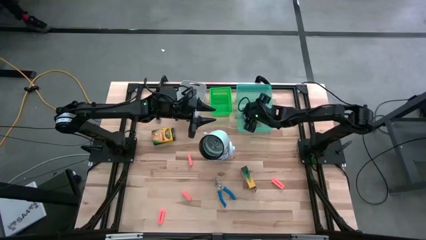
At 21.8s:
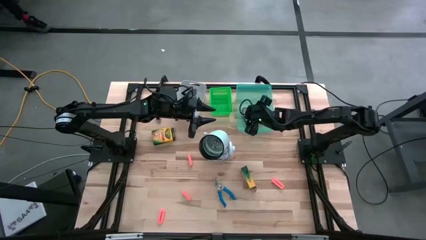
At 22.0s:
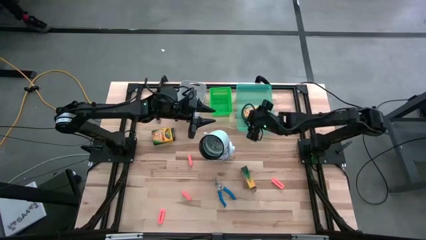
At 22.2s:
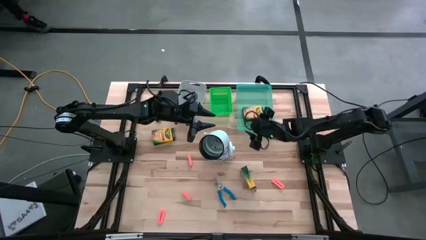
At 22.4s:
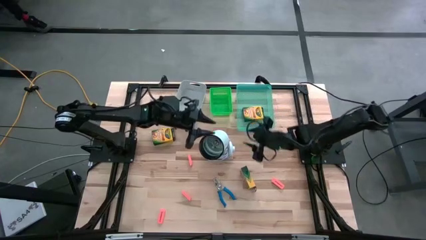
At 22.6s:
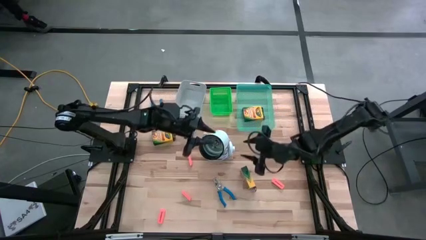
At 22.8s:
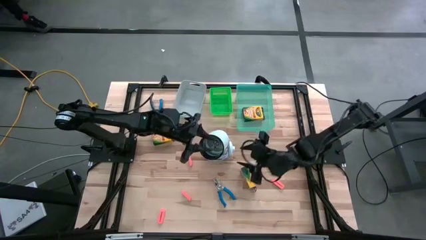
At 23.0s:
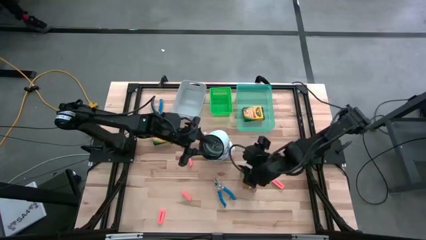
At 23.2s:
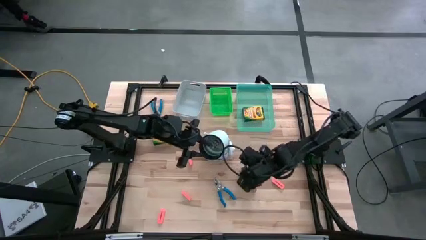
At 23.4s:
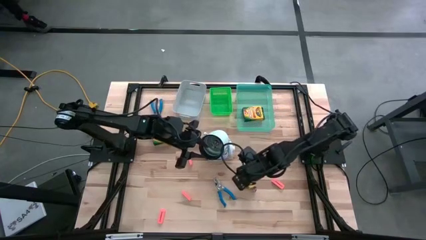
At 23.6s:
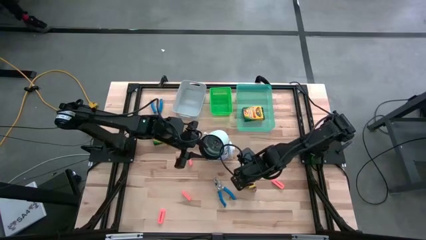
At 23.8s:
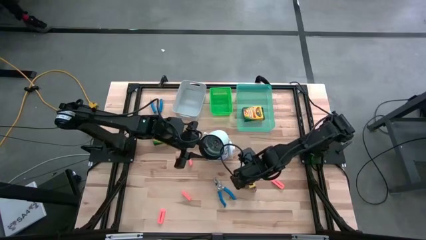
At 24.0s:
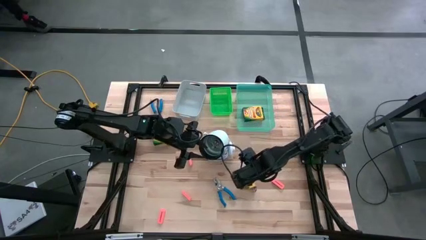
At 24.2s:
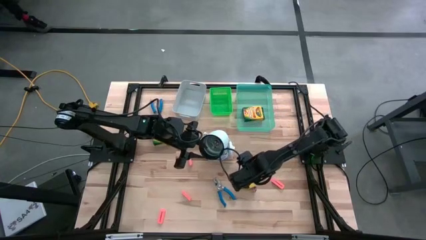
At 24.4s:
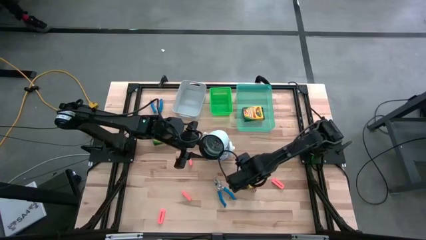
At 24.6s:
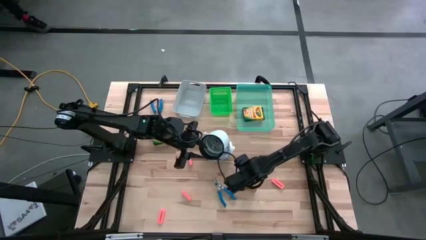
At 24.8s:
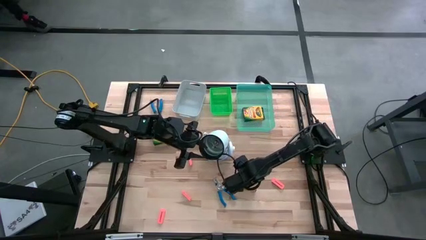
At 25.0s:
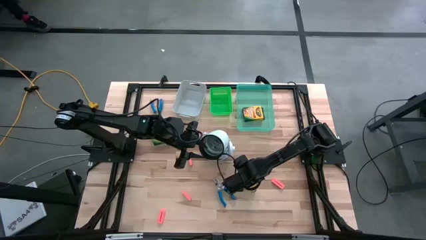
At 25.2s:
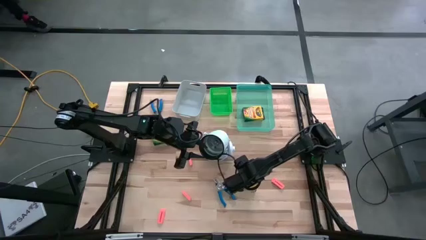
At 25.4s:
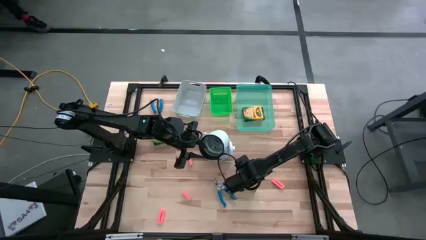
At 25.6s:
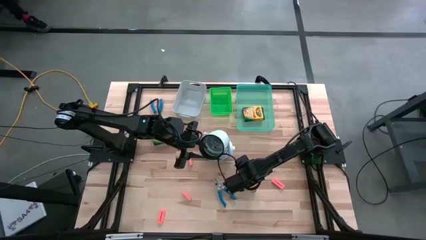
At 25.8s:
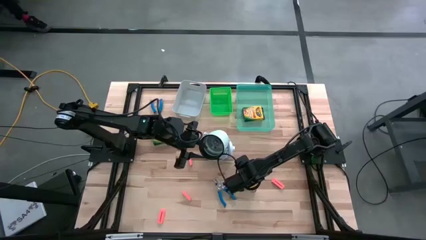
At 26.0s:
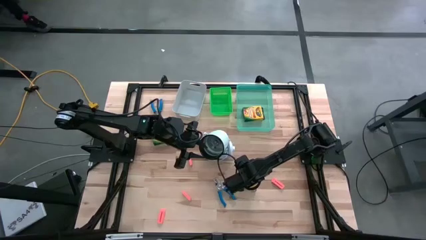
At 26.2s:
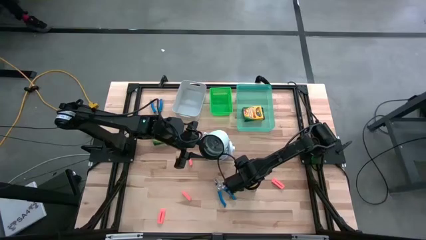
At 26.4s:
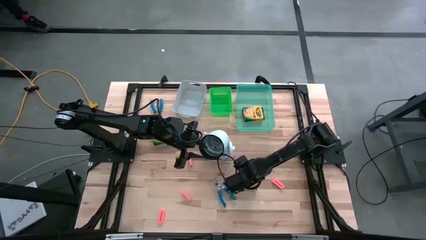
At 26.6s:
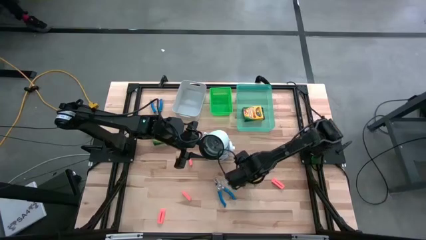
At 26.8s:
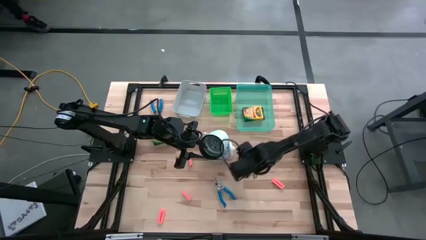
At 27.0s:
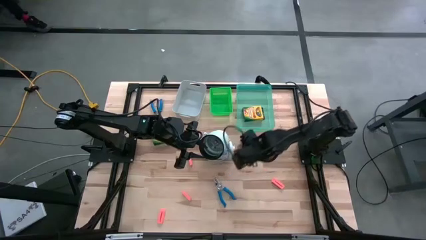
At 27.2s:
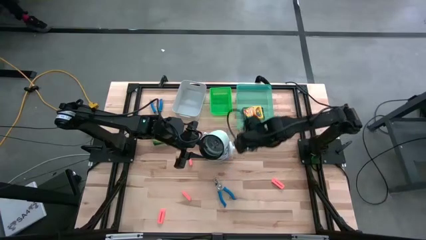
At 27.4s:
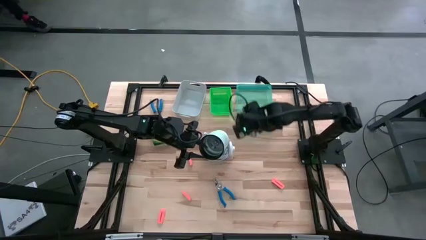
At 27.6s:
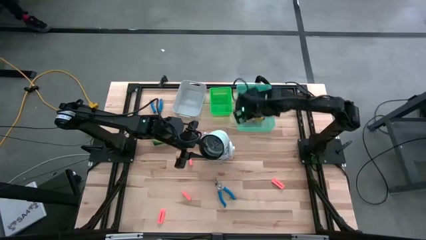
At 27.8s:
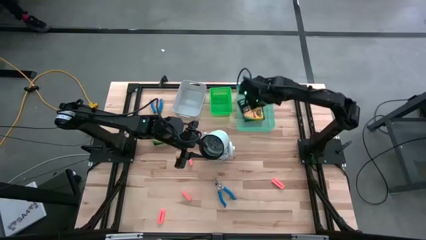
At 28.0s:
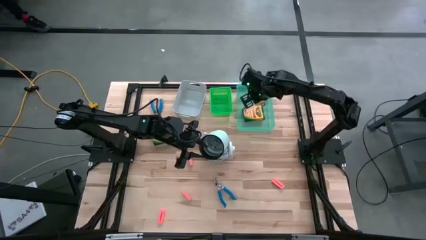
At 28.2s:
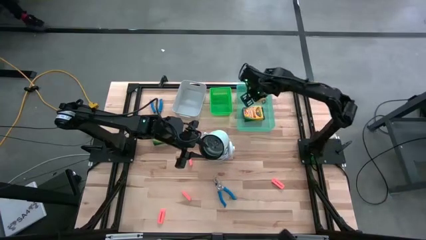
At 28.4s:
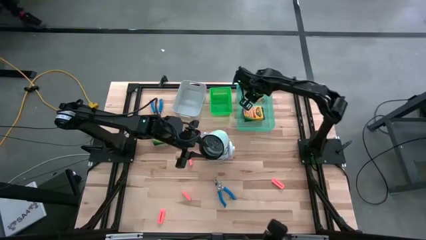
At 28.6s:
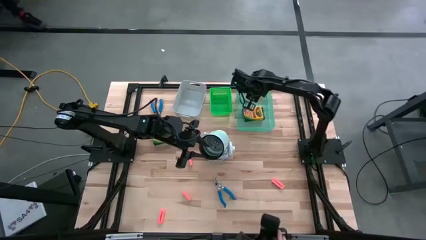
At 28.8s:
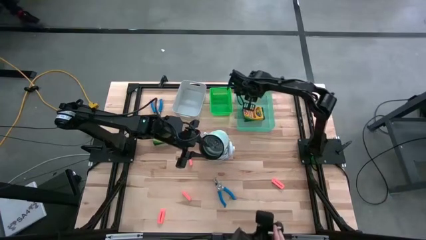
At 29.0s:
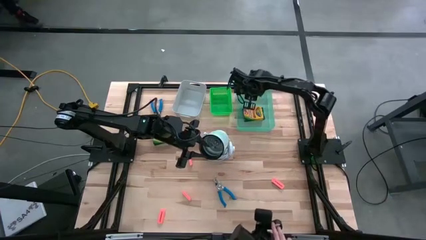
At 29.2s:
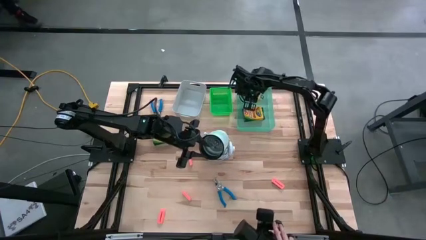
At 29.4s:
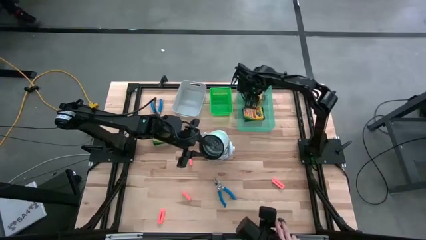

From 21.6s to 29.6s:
Task: Pick & Place School Supplies
Put the yellow crayon box into the blue bin

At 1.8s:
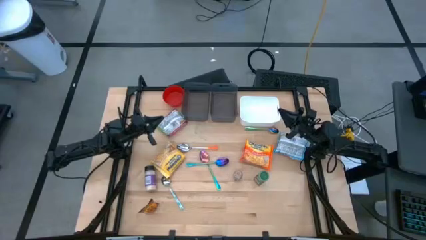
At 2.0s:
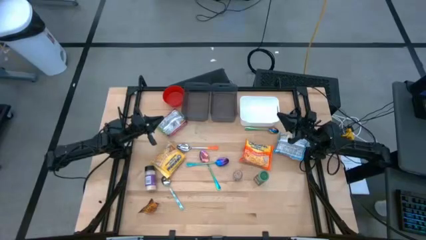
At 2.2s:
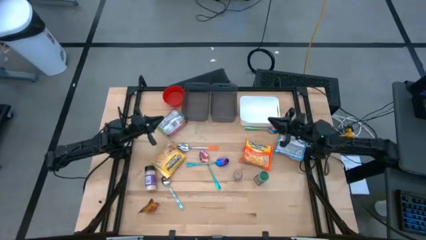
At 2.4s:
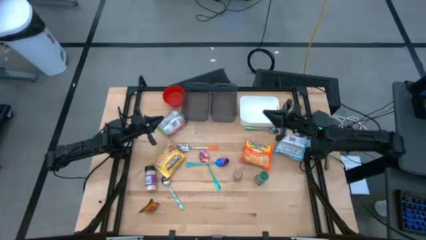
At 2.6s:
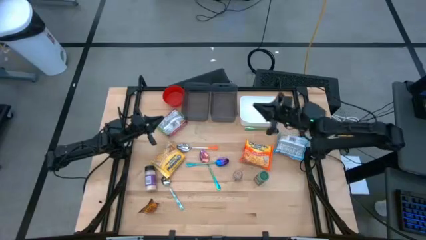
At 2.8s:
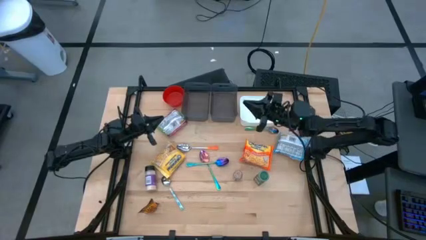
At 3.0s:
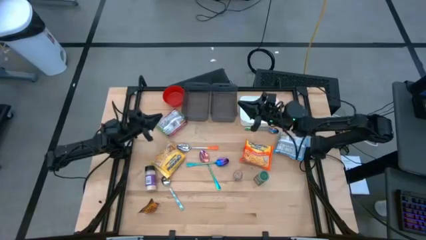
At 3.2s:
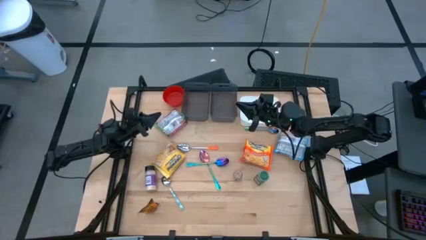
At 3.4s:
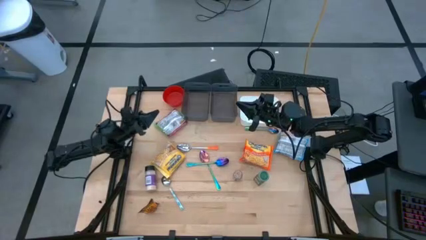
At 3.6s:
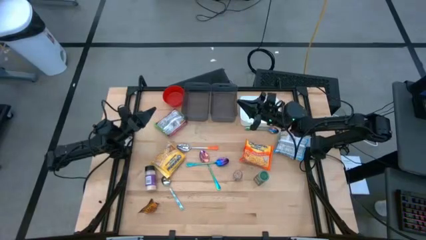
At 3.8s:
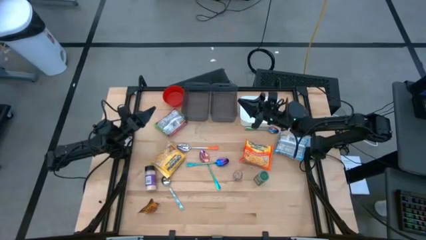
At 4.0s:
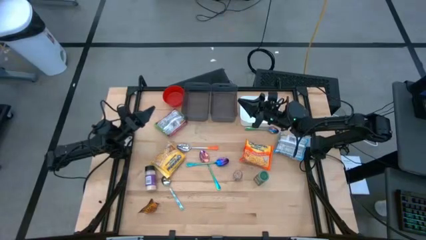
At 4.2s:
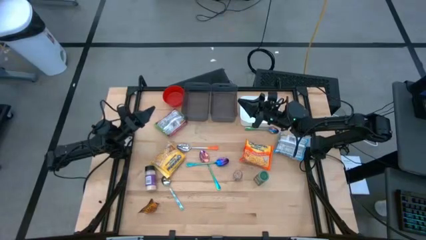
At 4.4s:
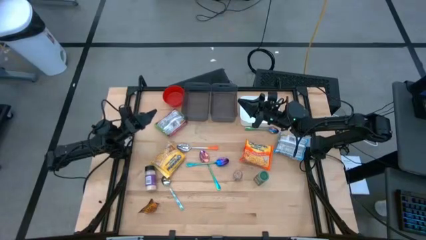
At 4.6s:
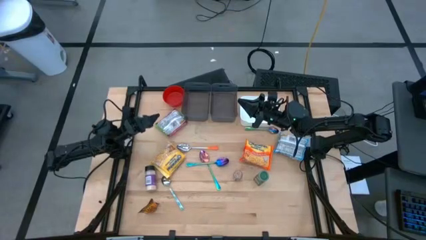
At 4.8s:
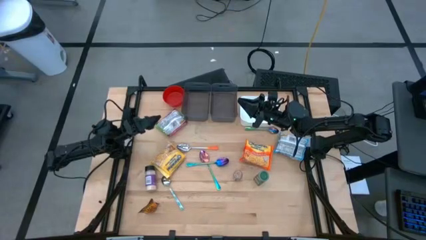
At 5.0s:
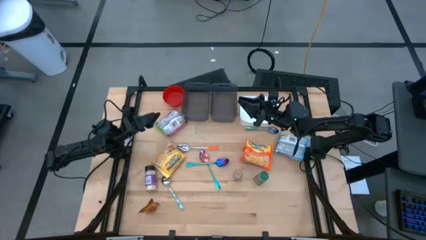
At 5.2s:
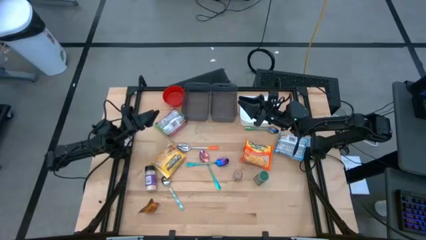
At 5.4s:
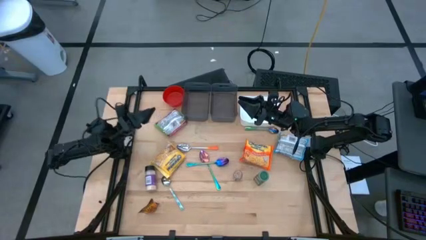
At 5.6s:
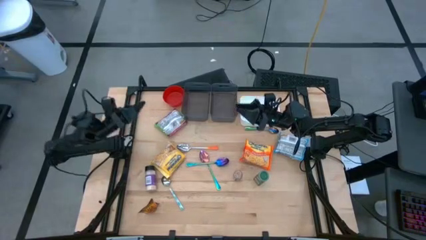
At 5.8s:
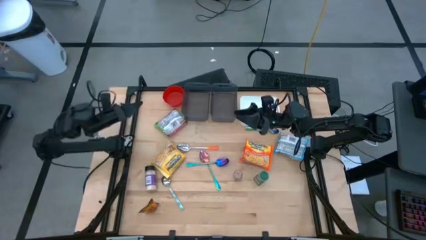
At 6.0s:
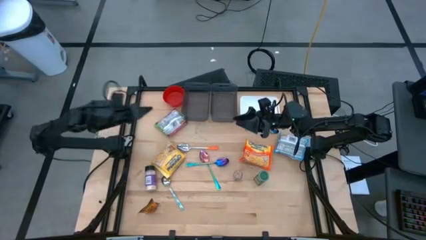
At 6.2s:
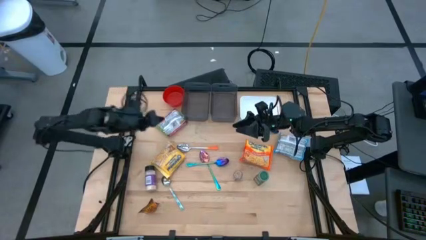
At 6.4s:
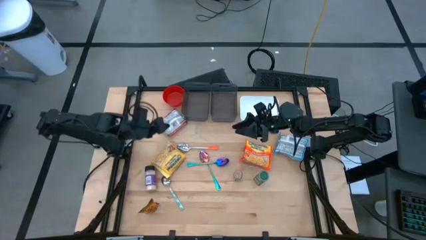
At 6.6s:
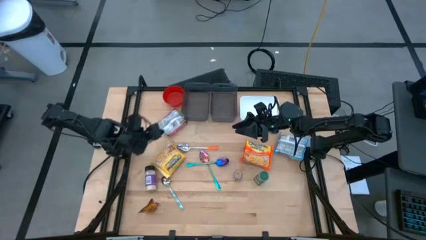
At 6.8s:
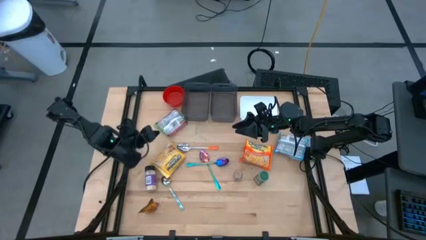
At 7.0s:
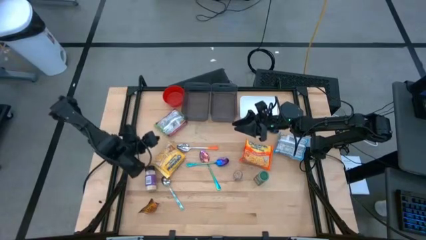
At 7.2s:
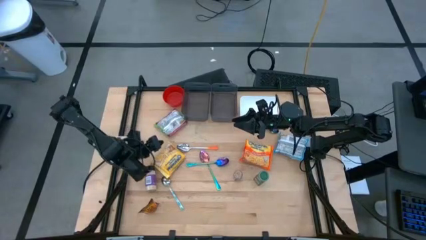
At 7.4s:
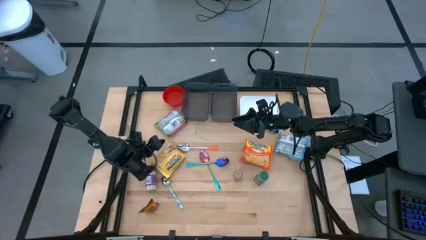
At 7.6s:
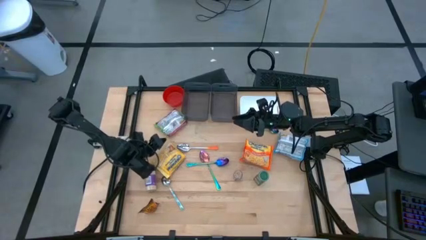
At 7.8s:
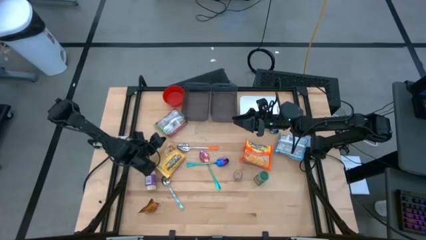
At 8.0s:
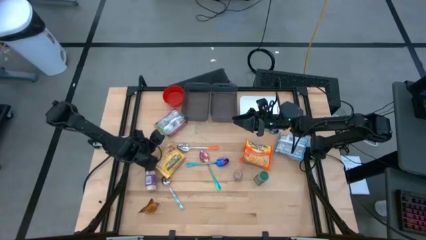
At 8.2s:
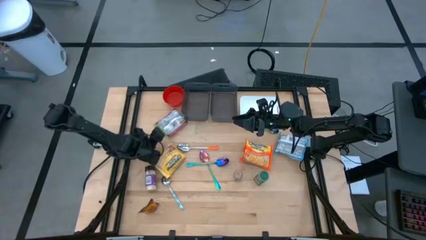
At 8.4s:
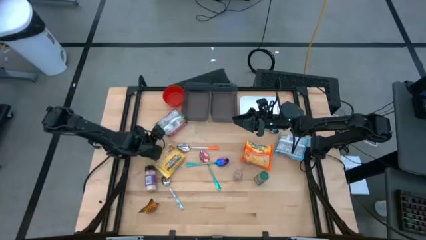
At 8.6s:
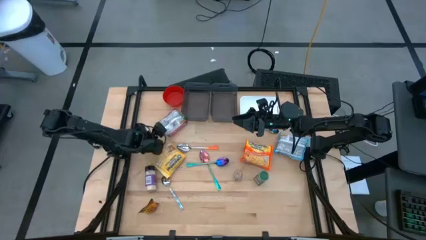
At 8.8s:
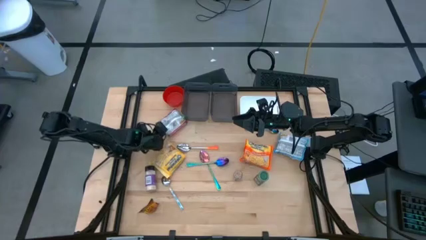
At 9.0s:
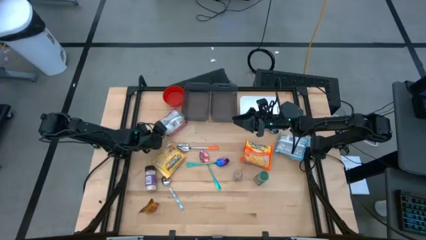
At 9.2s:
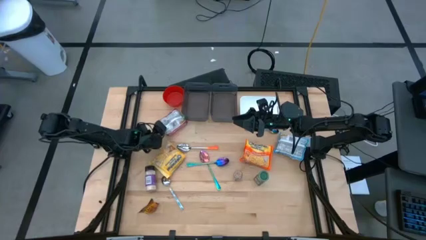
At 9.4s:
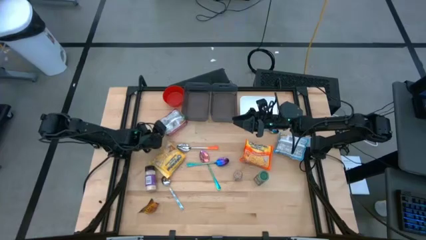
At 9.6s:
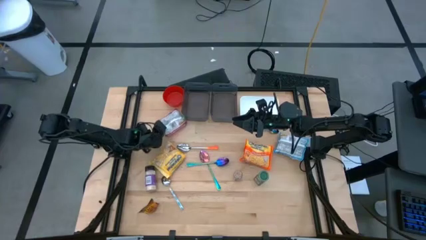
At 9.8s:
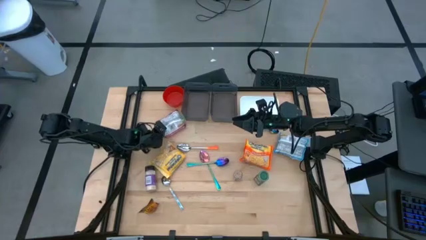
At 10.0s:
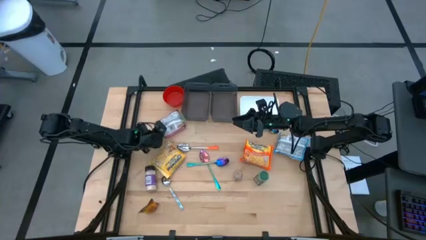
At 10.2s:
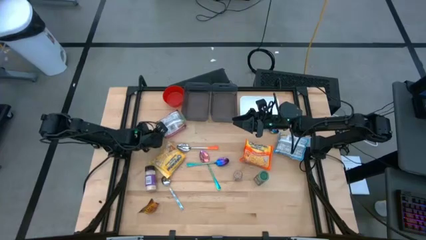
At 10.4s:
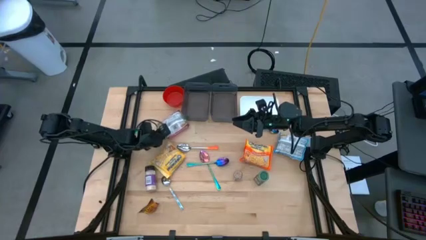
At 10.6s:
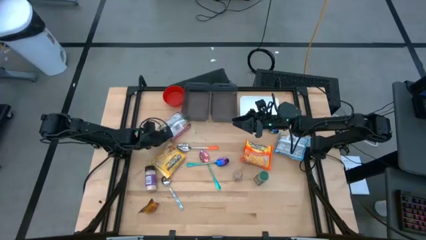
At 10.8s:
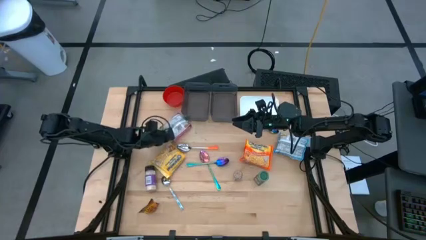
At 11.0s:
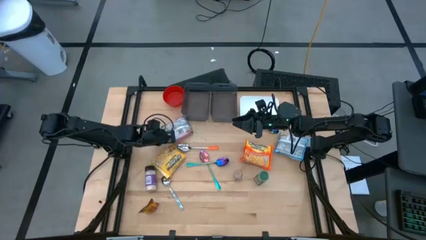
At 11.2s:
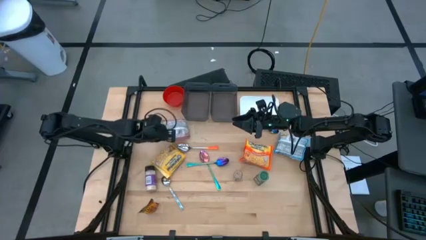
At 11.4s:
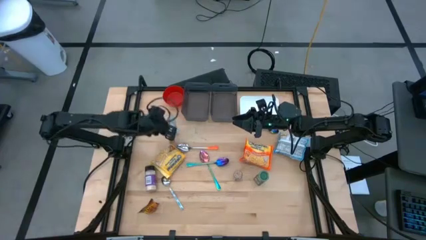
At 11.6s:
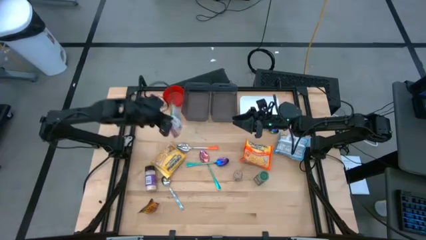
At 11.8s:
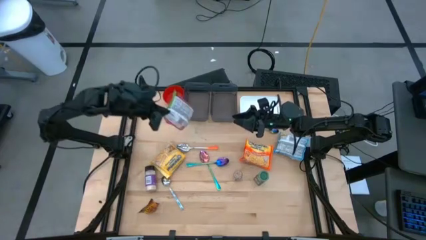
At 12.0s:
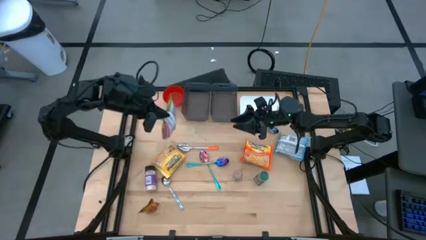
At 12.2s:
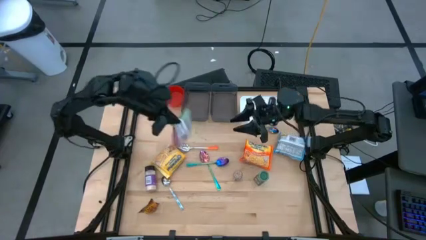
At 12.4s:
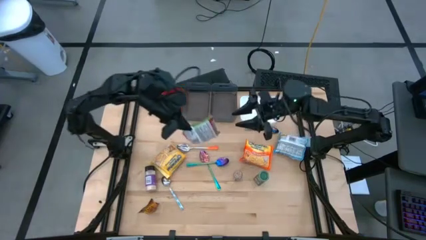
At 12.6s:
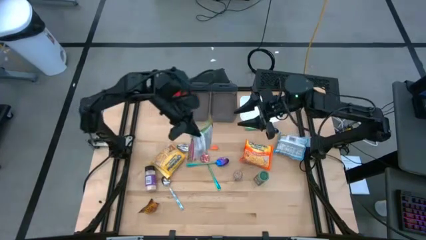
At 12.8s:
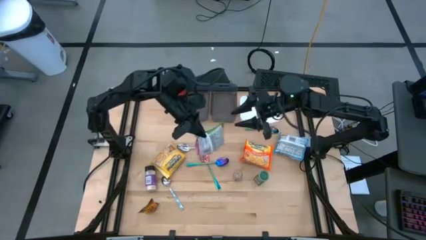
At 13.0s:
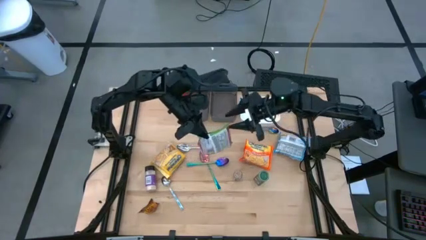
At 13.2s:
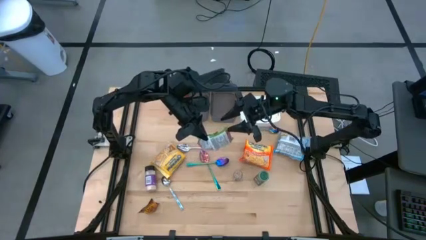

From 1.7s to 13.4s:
Task: Pick & Place Food Item
Put the green noodle pack into the left black bin
